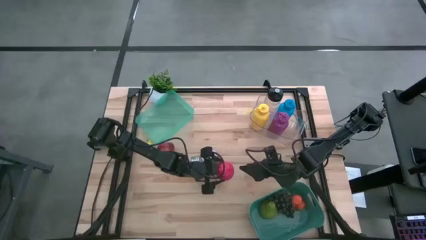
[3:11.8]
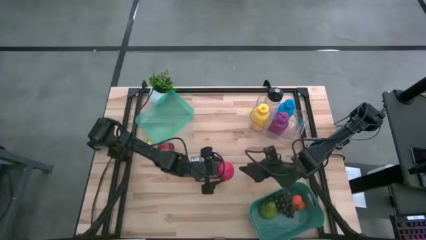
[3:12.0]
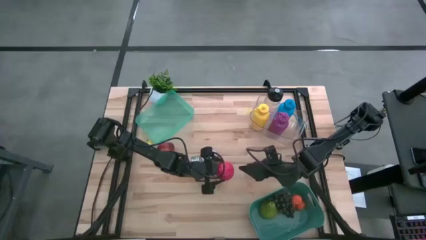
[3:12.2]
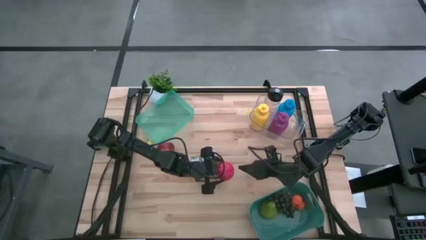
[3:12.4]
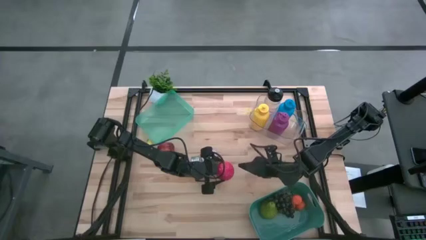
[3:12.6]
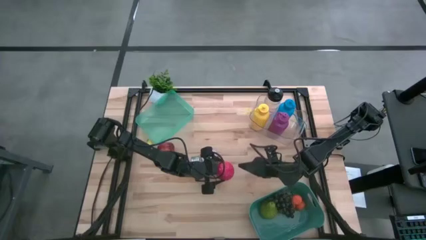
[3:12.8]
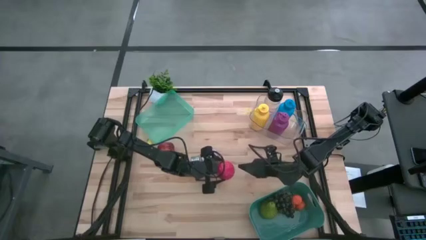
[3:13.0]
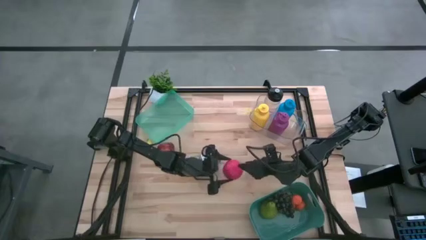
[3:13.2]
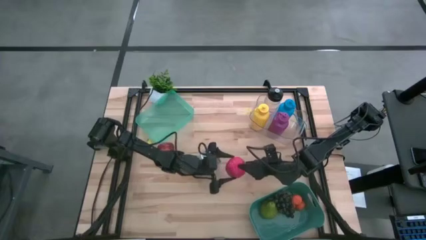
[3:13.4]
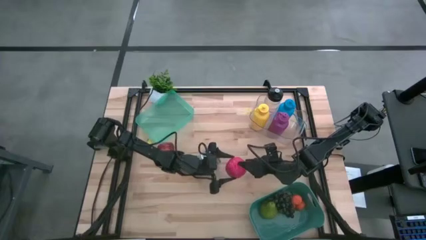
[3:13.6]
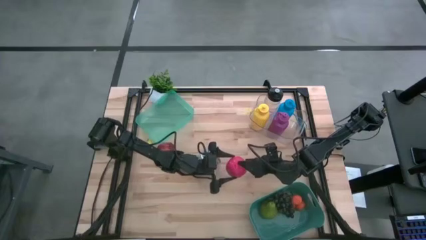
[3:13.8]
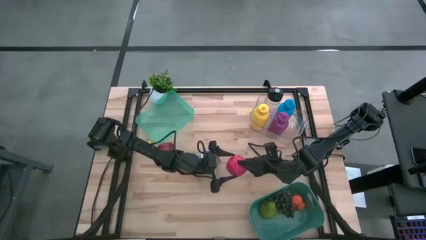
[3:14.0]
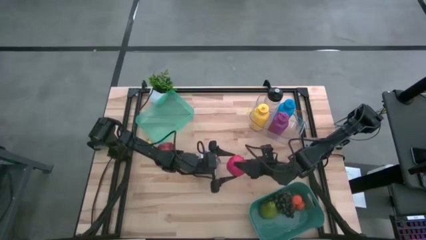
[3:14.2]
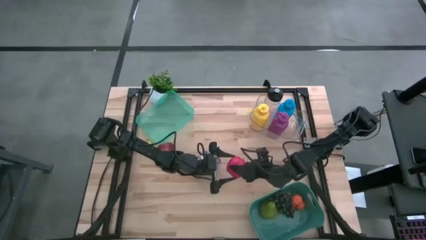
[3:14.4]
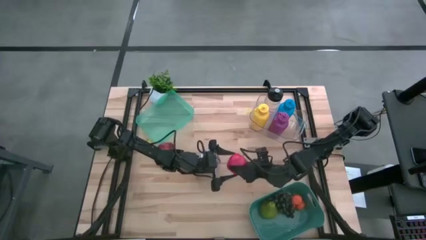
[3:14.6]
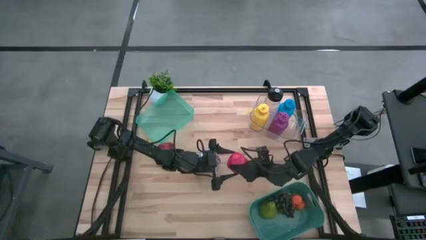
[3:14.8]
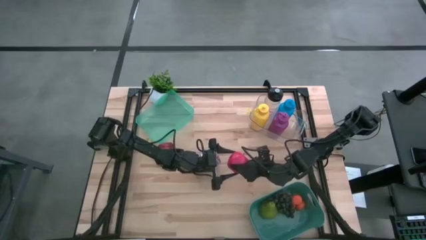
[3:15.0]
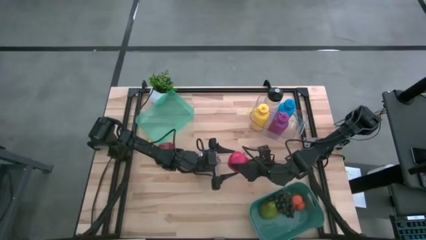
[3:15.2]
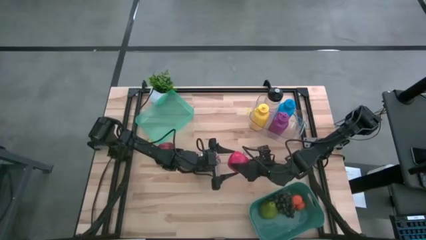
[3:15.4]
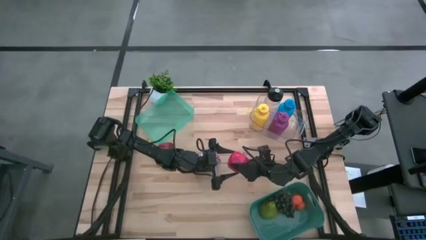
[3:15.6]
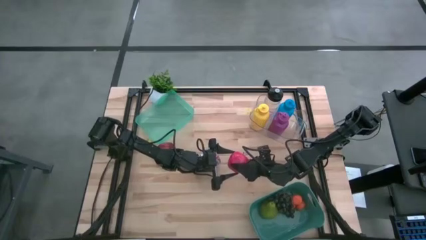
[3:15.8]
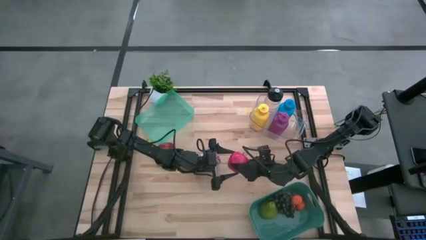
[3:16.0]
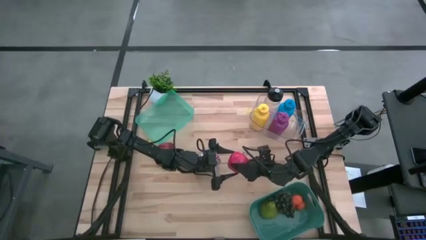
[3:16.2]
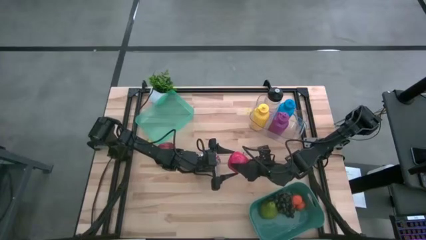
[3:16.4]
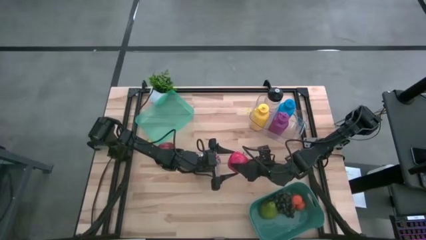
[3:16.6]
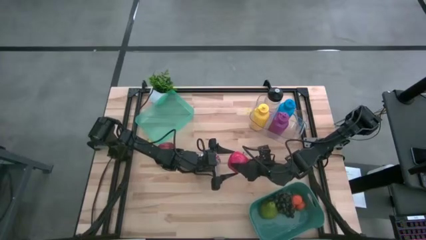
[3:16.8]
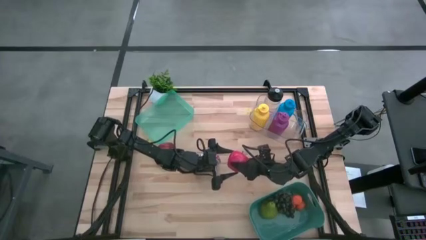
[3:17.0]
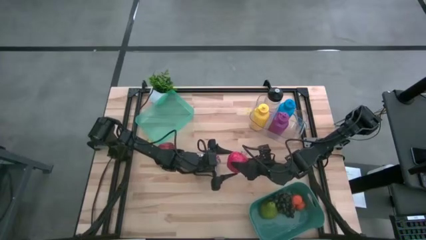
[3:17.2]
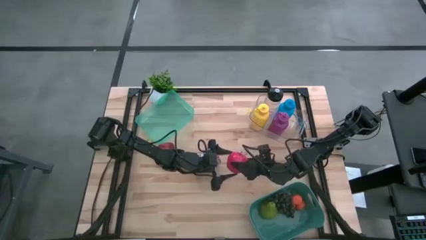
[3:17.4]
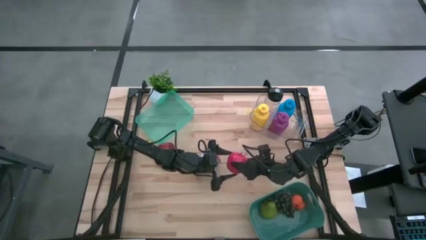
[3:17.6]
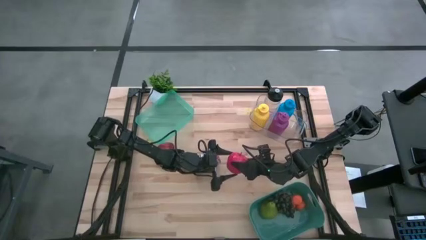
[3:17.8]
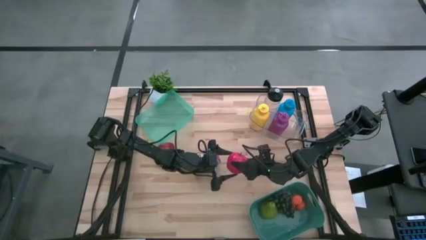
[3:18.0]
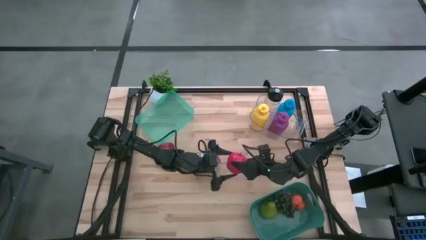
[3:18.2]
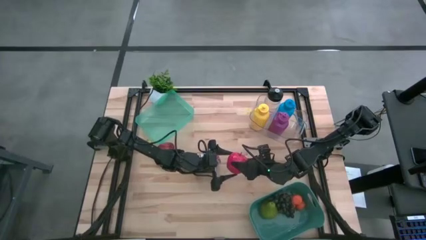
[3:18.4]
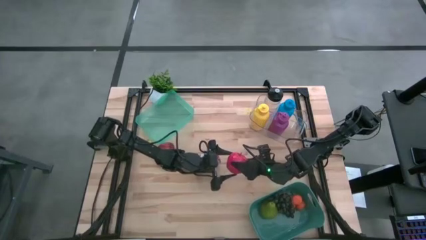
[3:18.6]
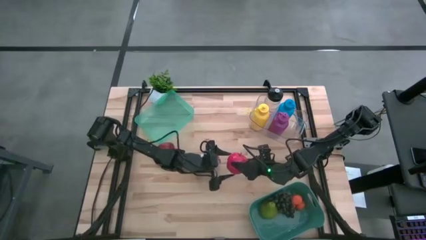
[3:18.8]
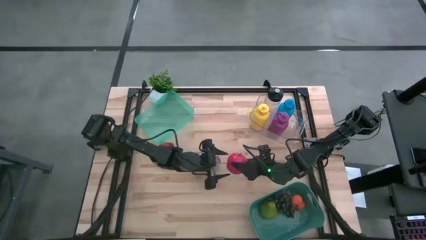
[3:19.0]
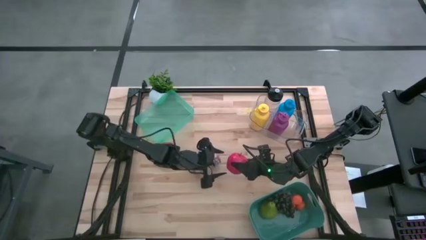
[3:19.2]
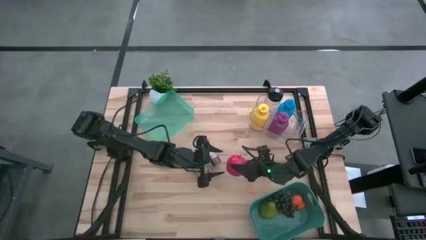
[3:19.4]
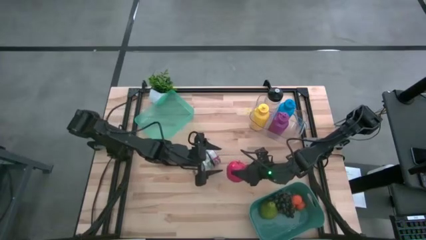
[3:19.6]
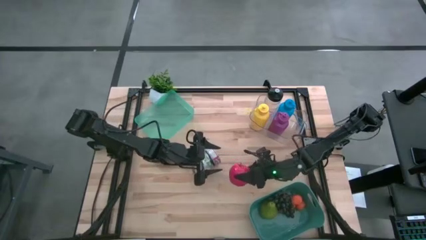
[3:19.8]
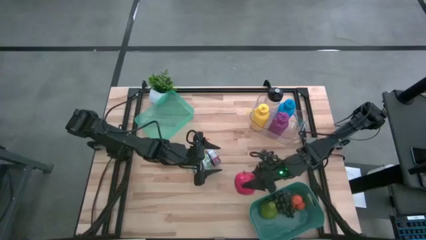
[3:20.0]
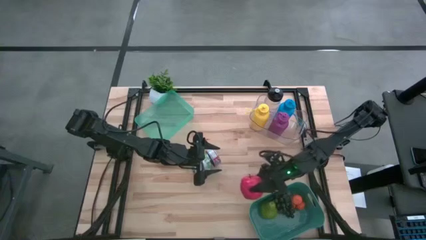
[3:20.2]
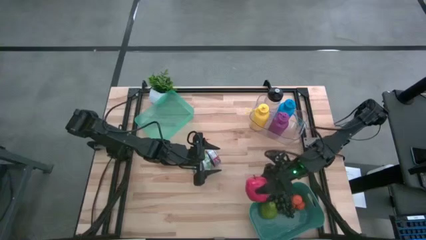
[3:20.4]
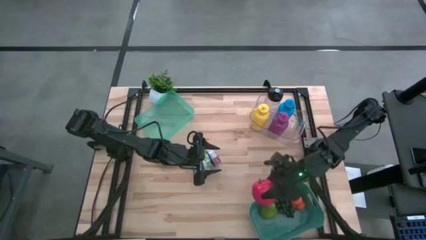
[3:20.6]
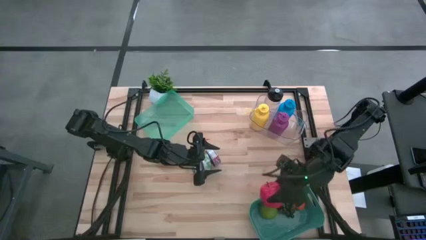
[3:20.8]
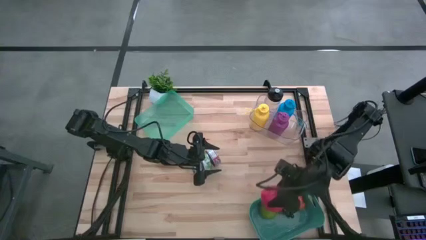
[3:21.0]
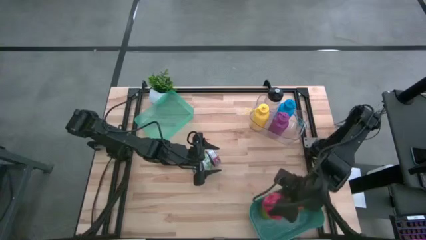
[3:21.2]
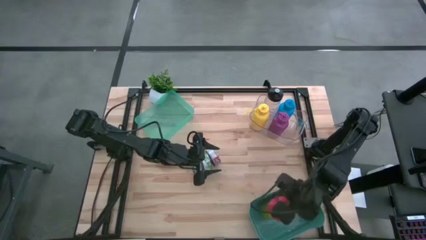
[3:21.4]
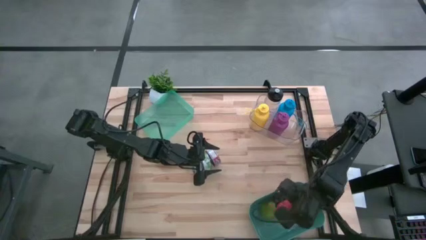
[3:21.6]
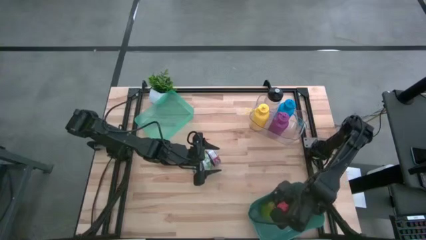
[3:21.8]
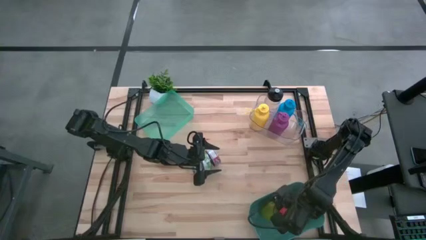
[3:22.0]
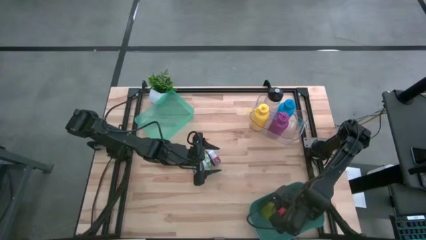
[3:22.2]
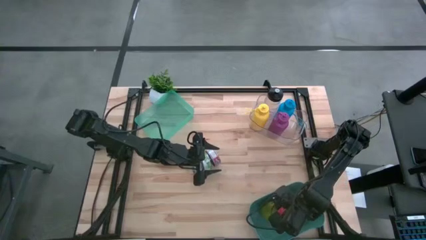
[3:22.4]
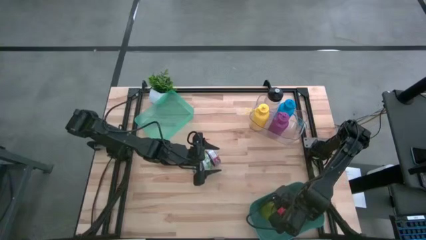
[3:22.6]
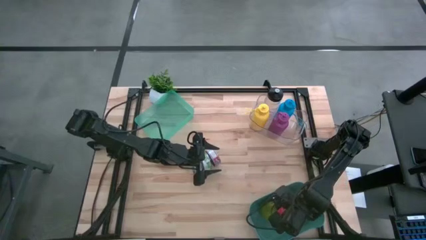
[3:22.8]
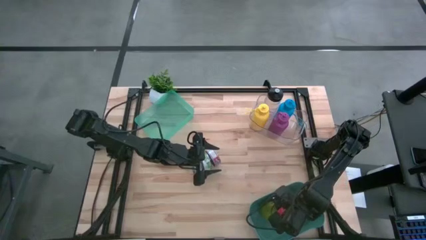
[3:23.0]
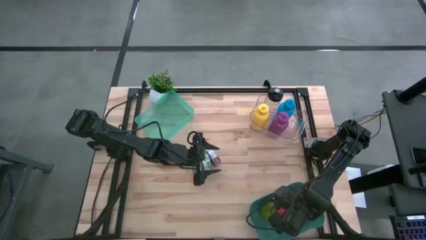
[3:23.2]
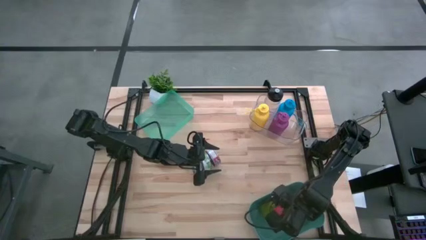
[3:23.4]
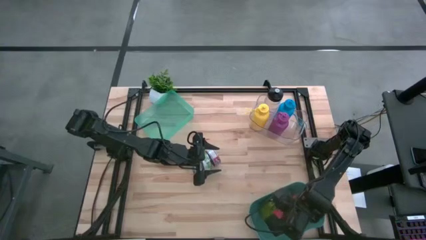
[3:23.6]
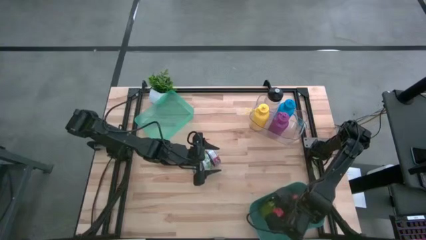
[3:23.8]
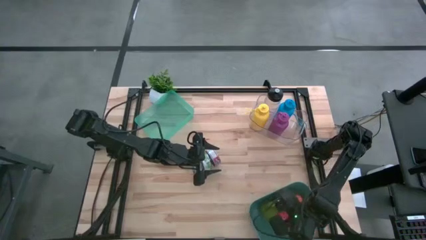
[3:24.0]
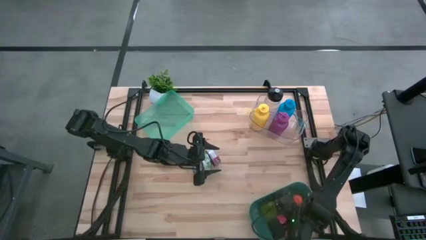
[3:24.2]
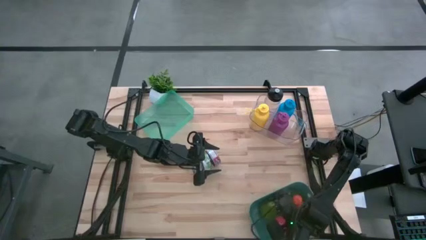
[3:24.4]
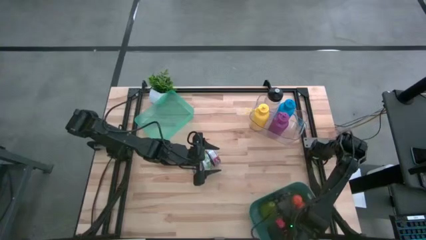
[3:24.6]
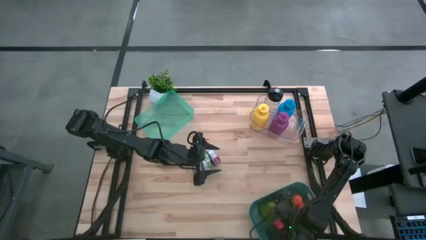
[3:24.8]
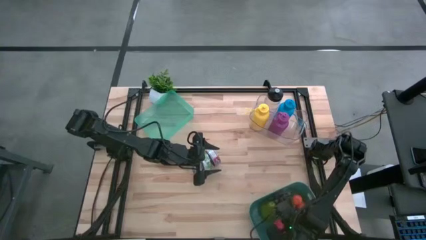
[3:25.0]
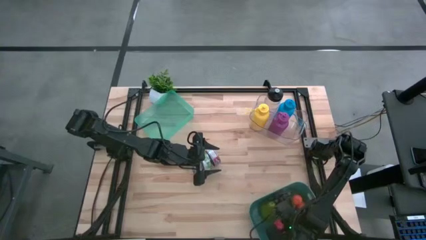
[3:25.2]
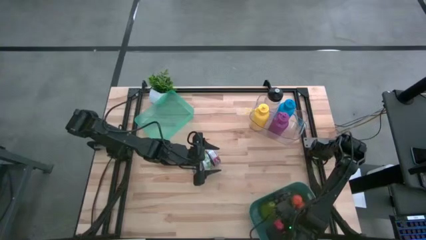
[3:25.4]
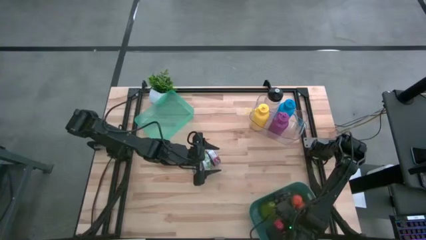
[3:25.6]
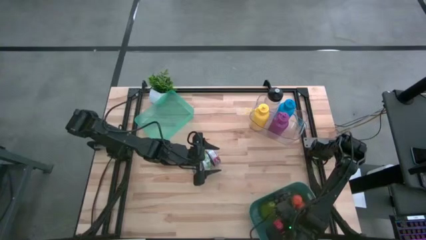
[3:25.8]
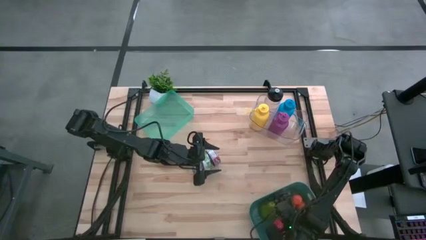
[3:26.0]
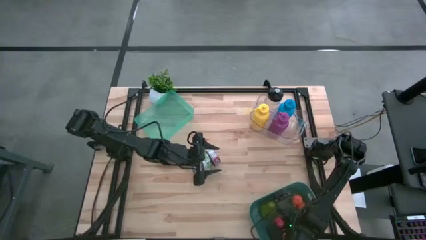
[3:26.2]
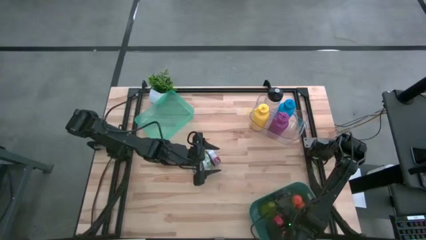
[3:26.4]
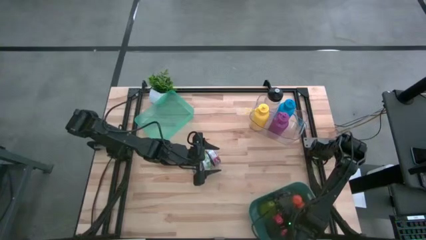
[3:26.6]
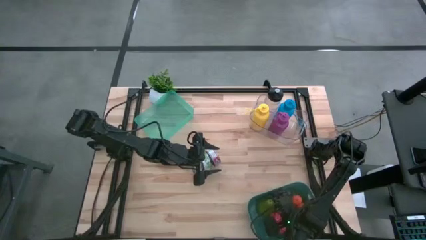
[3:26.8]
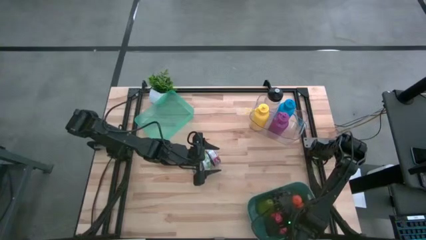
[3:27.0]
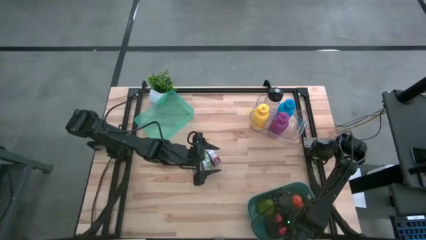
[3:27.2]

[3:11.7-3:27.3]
Task: Pick & Place Food Item
Put the bottom red apple into the dark green bin
